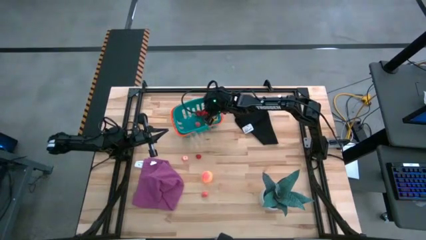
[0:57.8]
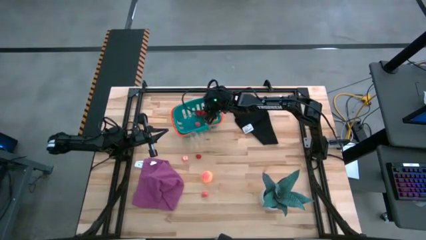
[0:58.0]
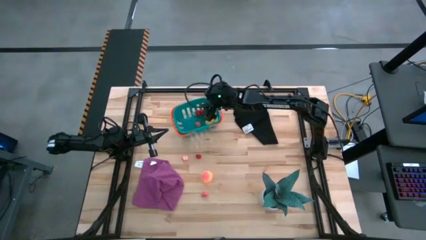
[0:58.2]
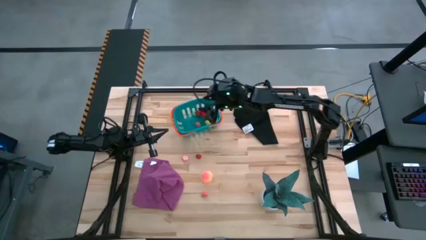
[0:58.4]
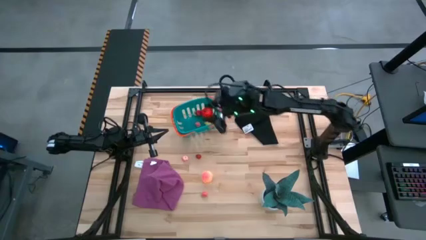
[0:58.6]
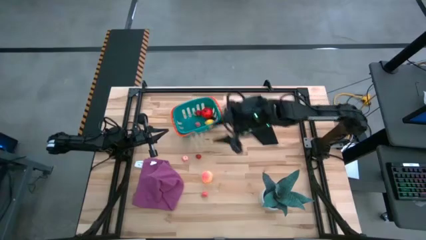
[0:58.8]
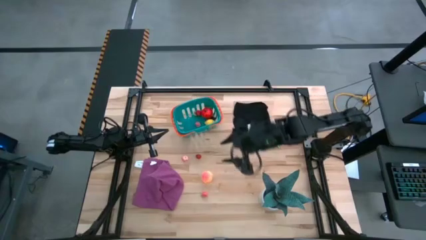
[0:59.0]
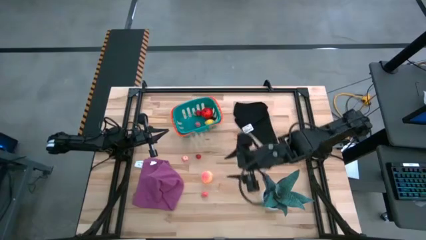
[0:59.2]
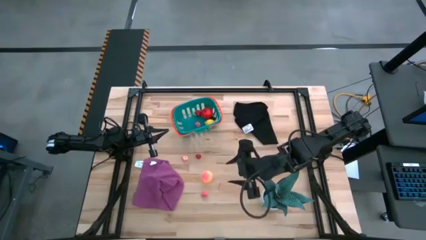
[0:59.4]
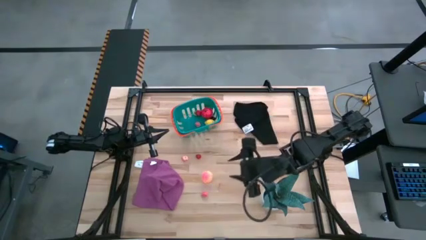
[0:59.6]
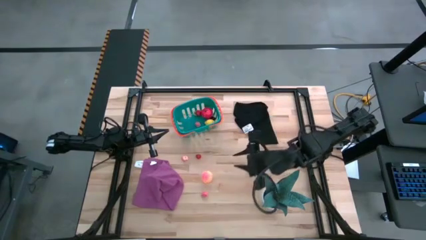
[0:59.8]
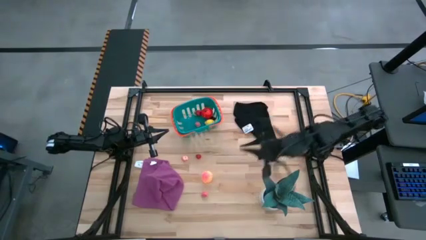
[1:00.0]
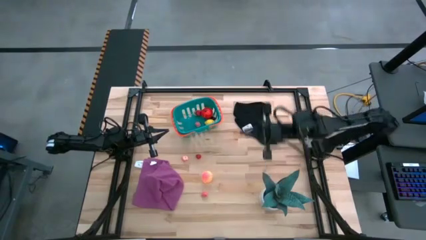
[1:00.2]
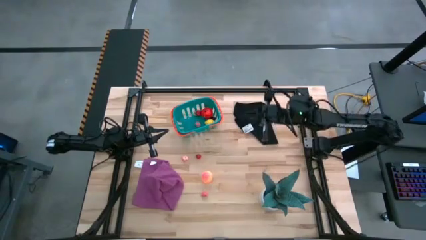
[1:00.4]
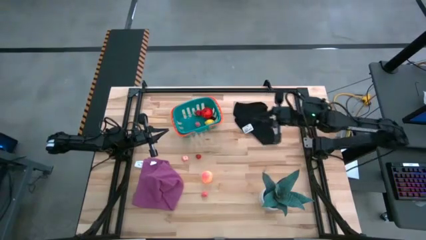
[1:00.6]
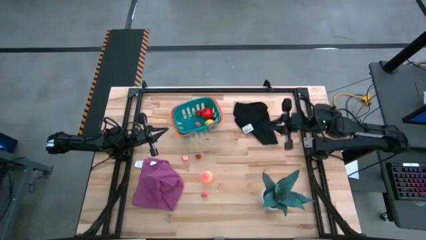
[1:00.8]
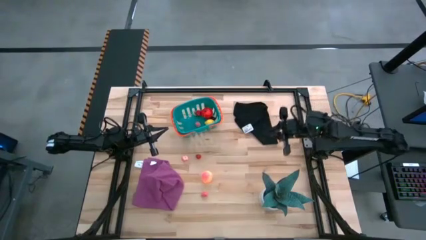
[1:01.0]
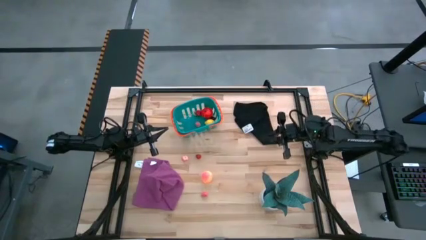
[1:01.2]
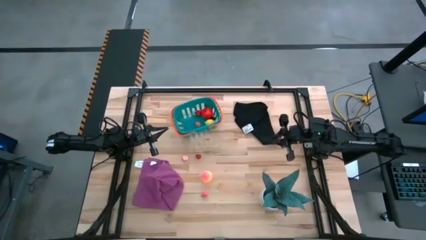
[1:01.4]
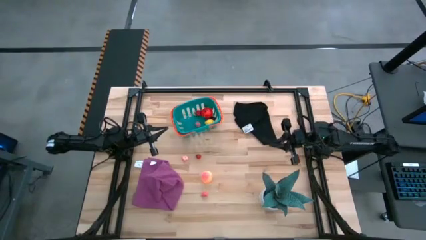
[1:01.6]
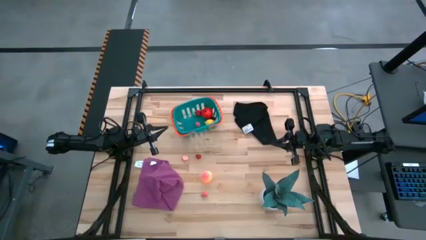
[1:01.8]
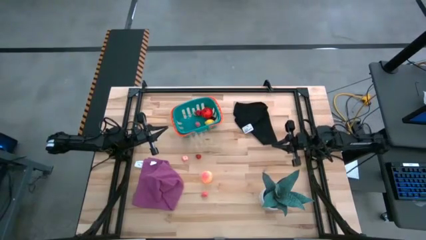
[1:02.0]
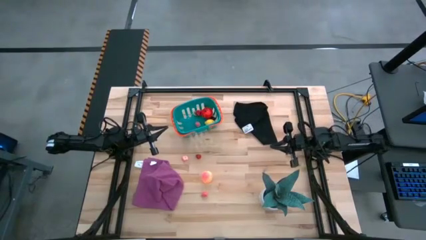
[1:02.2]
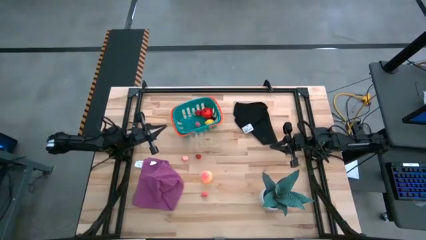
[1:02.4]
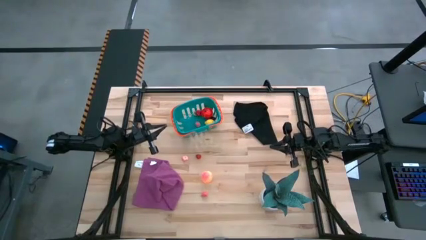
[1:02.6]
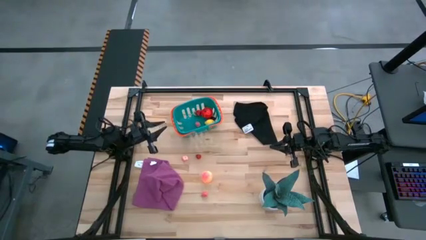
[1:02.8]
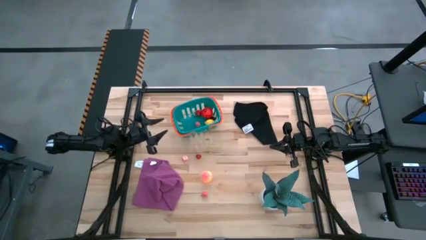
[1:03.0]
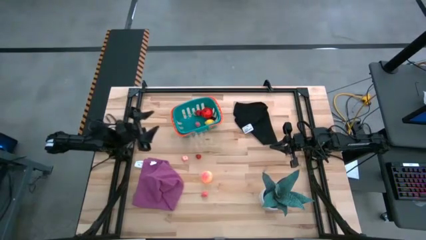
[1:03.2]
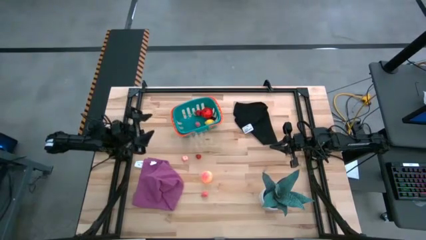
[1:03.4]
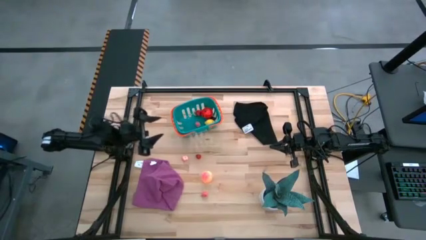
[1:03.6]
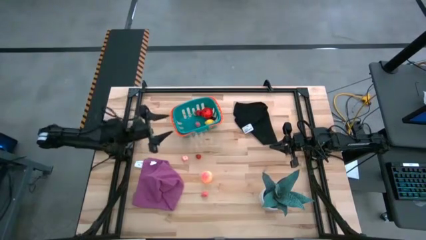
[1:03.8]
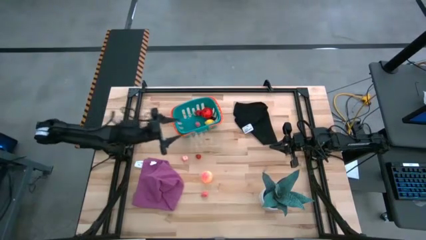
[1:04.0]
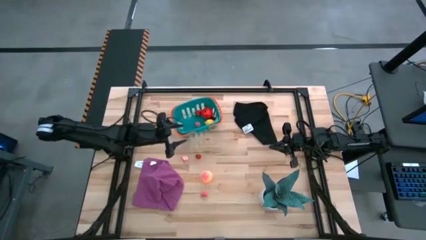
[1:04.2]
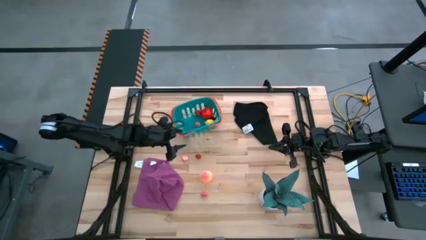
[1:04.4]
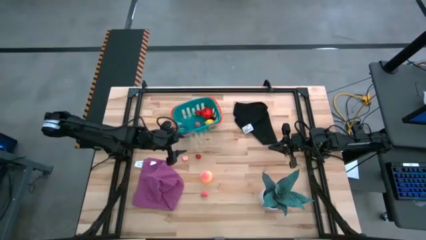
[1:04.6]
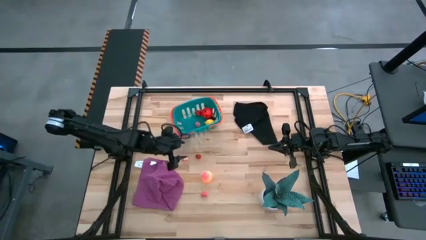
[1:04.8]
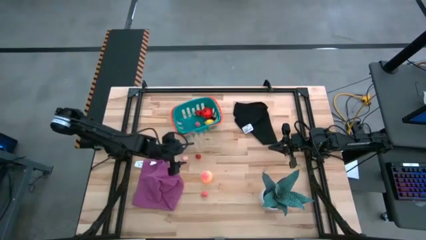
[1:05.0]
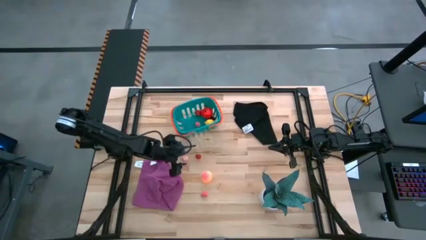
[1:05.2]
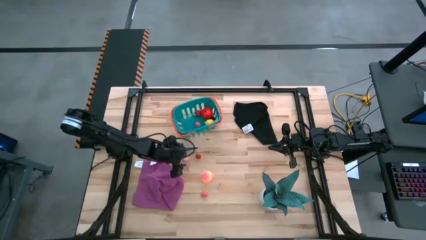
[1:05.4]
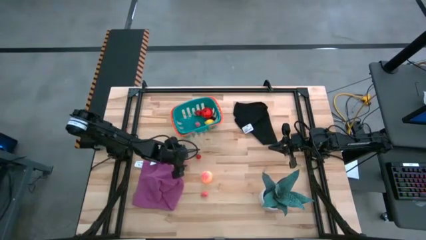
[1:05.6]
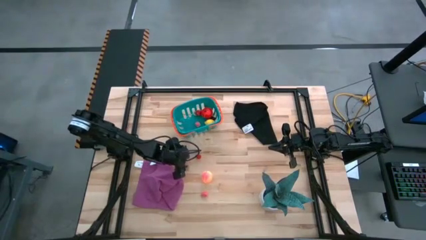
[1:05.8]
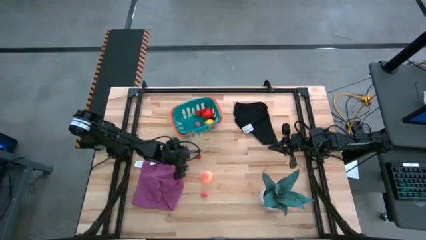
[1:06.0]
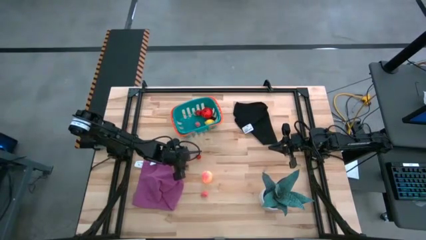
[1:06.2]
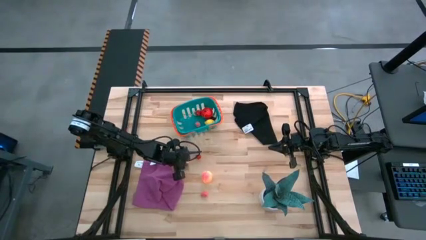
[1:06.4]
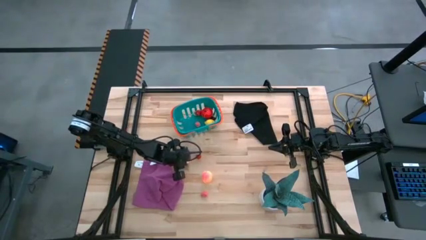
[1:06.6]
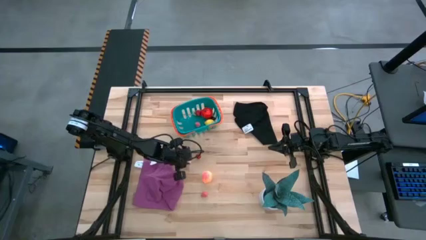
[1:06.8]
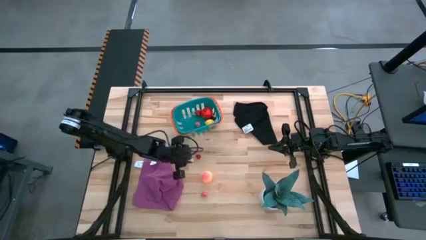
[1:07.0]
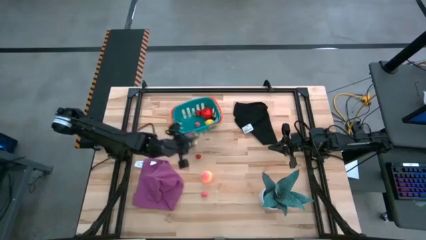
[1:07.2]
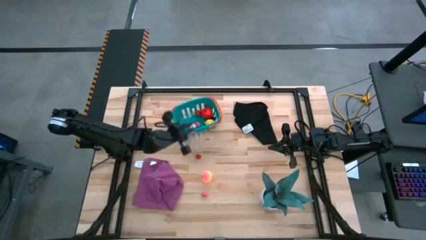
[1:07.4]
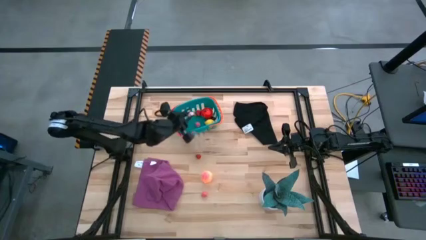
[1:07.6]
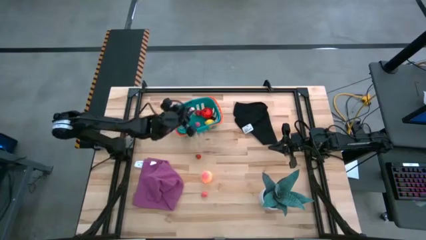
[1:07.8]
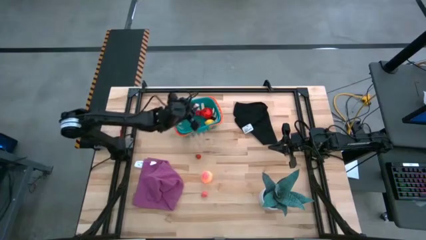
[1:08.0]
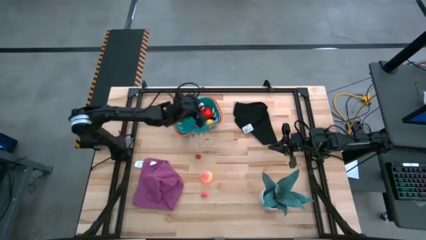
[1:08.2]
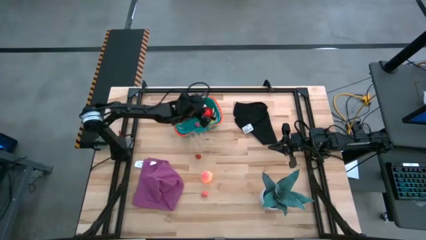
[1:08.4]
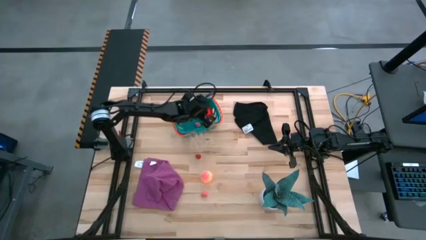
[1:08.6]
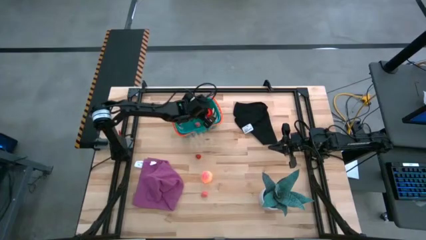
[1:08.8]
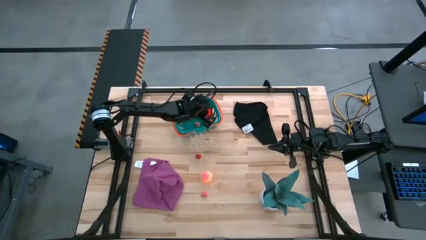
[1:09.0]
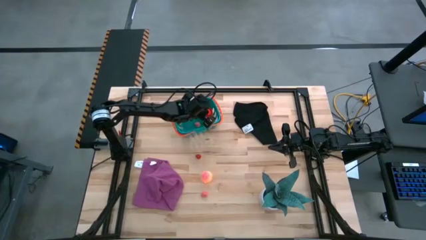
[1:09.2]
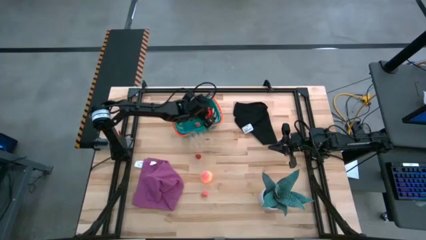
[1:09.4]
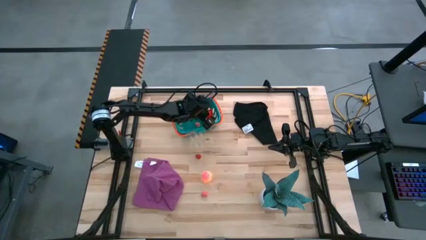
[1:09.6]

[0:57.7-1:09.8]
Task: Pick and placing Produce into tupperware
Put the top small pink peach into the basket

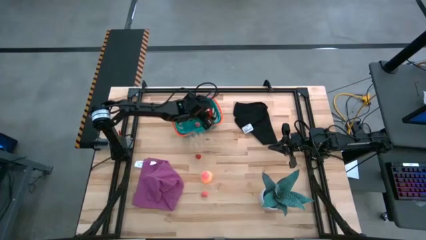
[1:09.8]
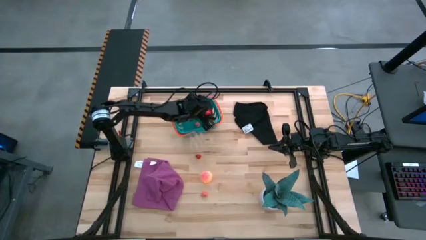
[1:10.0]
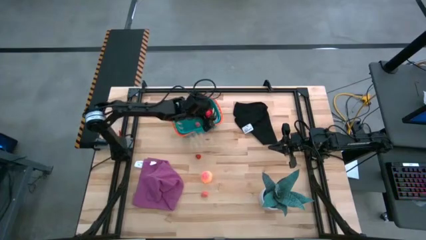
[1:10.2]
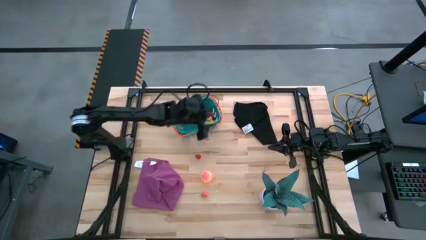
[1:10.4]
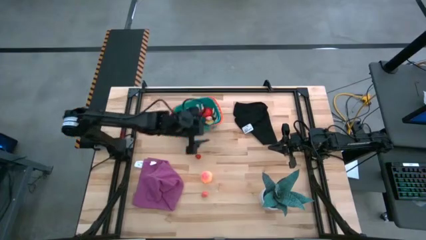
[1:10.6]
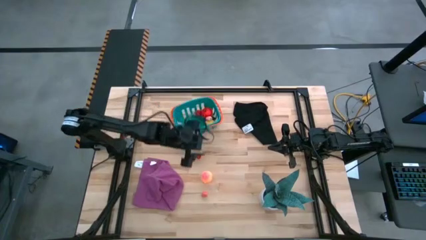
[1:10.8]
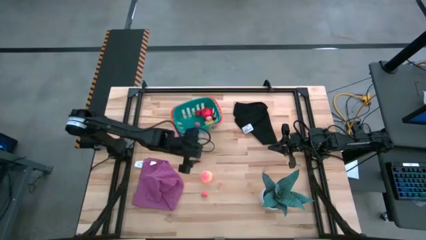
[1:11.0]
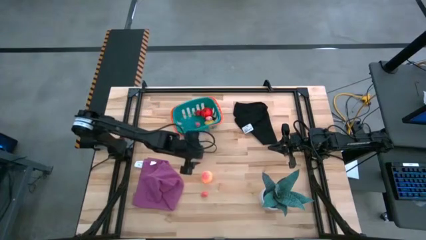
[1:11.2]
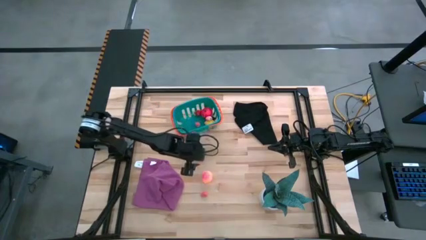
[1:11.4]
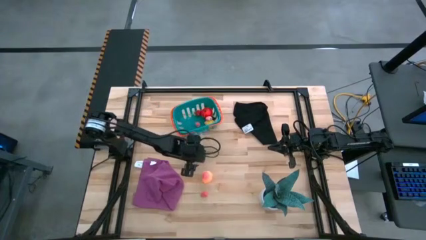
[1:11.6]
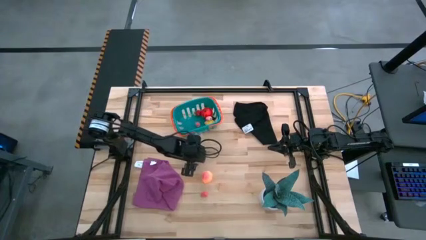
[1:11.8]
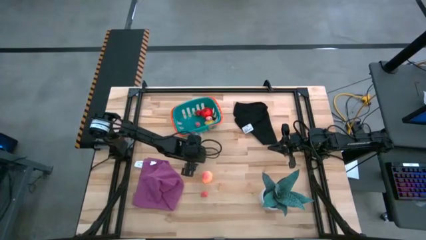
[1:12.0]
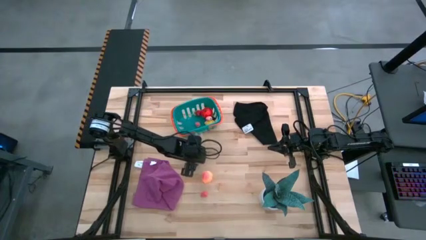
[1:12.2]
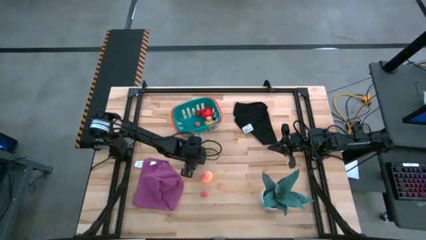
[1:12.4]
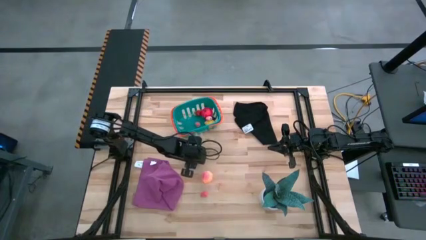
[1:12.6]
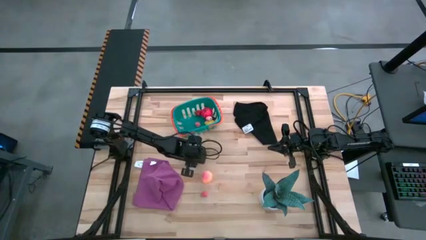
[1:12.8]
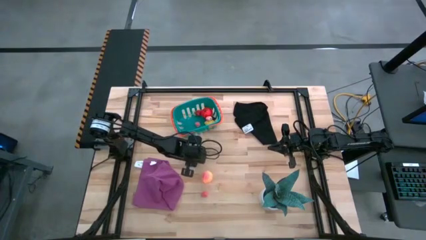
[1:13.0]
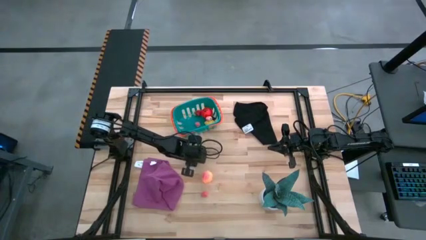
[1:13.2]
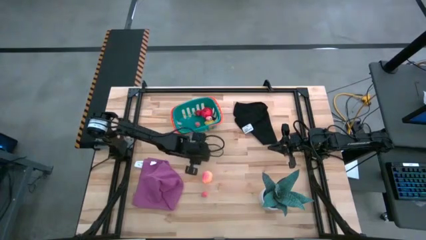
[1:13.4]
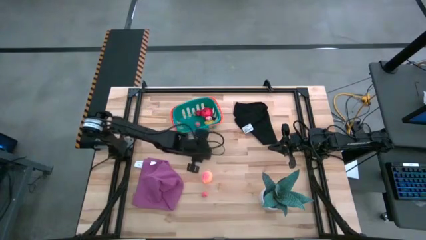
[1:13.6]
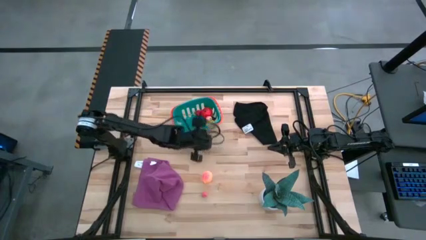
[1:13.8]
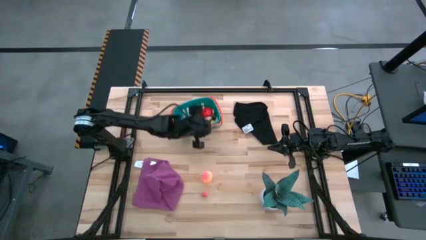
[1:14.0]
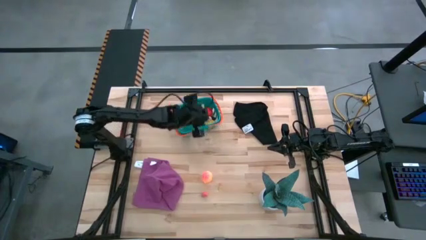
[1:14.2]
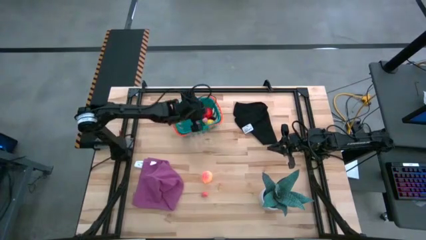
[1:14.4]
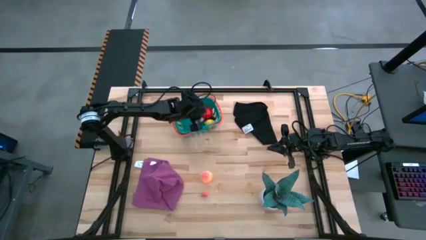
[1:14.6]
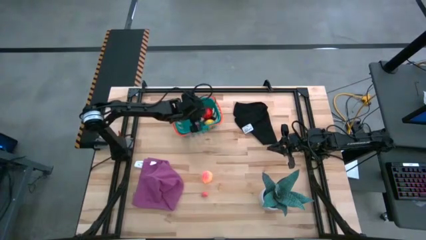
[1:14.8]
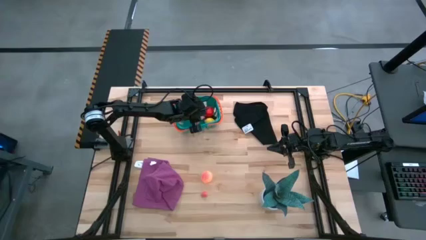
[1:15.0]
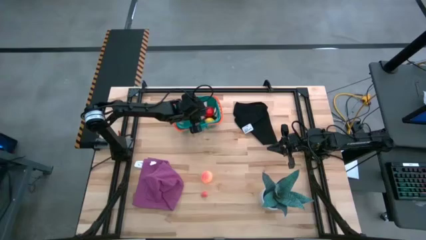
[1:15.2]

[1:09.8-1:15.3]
Put the raspberry into the basket
